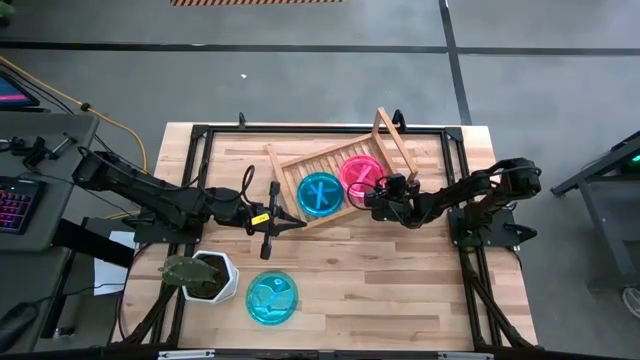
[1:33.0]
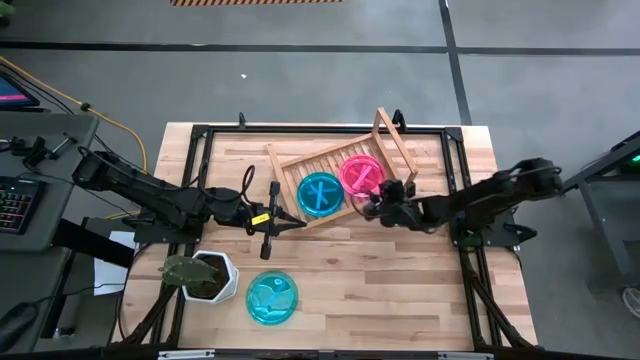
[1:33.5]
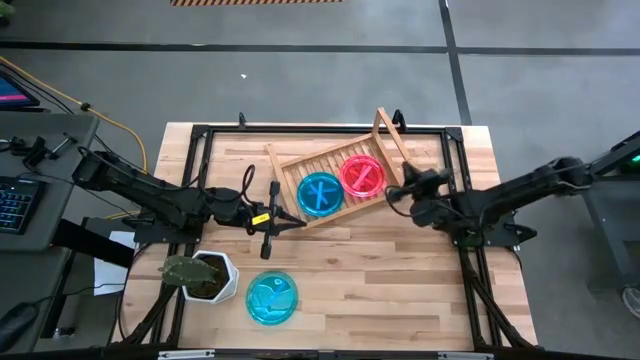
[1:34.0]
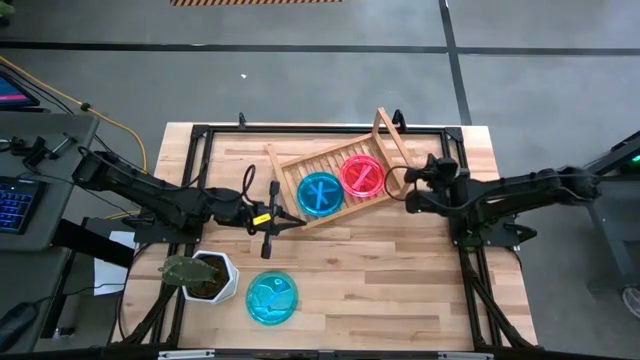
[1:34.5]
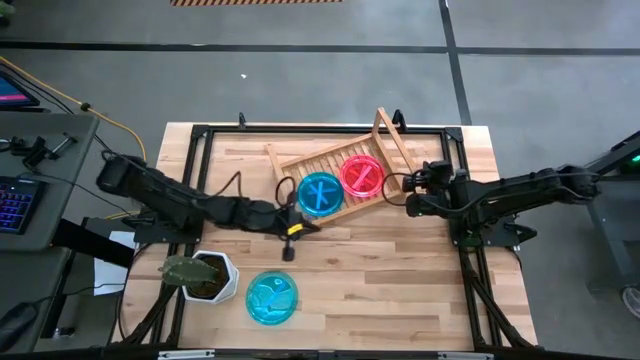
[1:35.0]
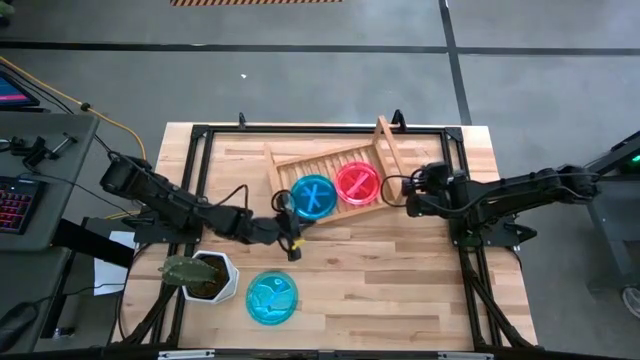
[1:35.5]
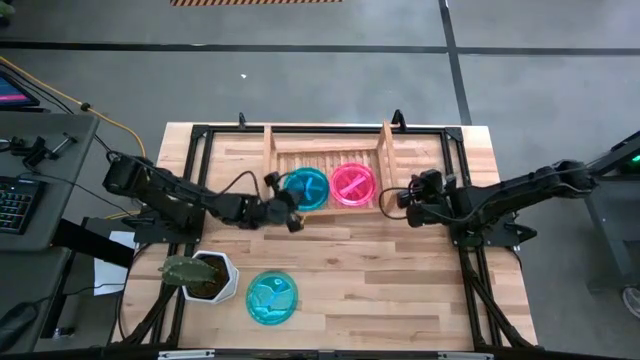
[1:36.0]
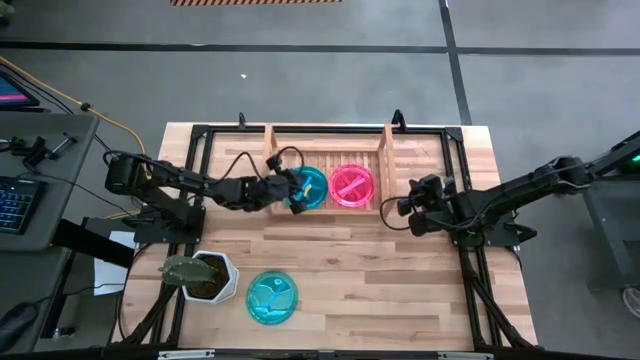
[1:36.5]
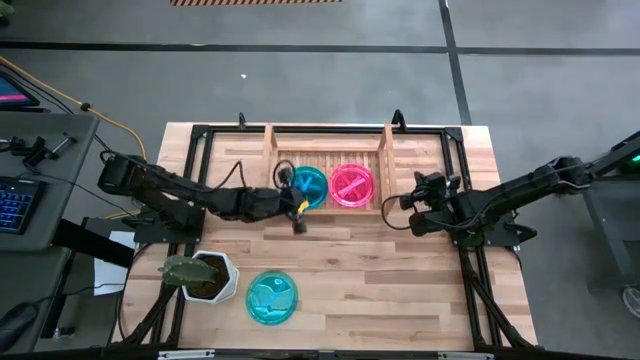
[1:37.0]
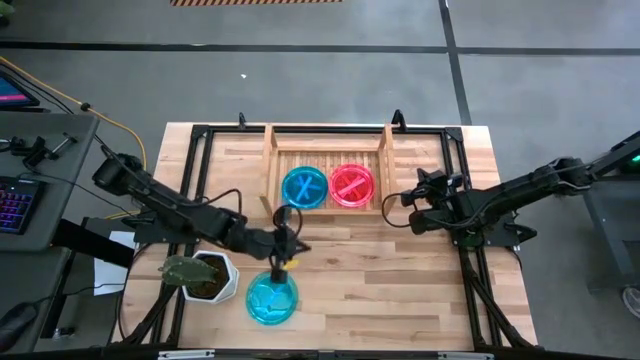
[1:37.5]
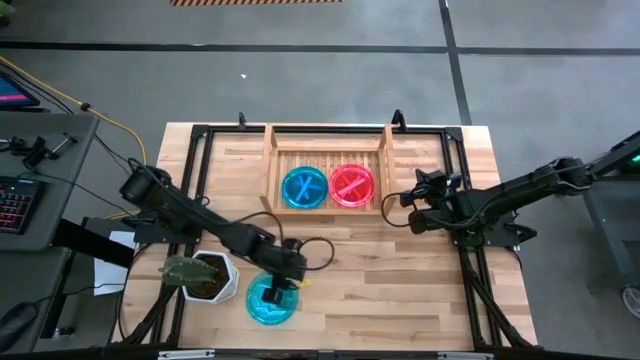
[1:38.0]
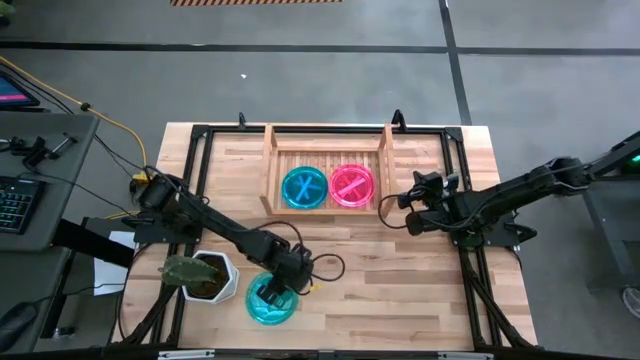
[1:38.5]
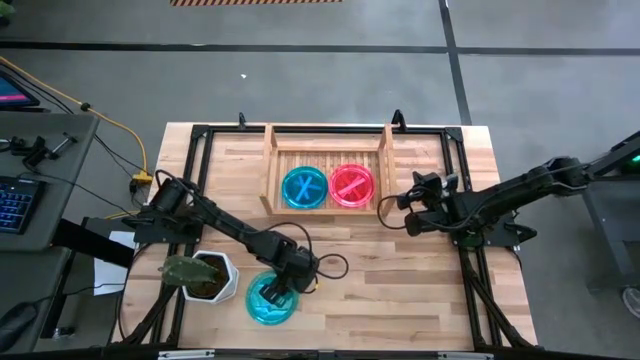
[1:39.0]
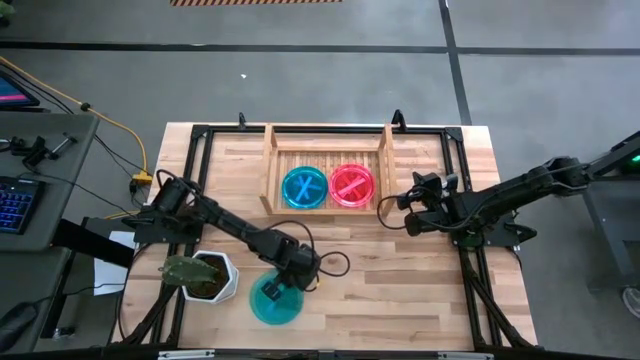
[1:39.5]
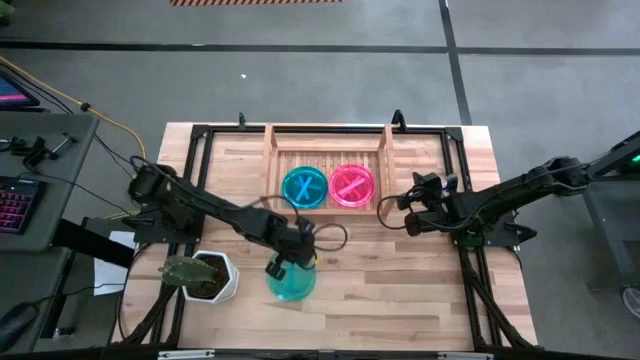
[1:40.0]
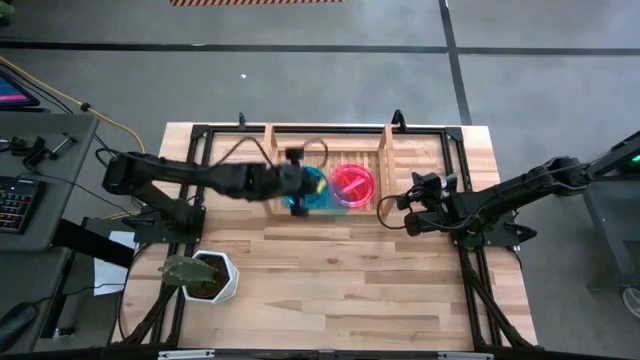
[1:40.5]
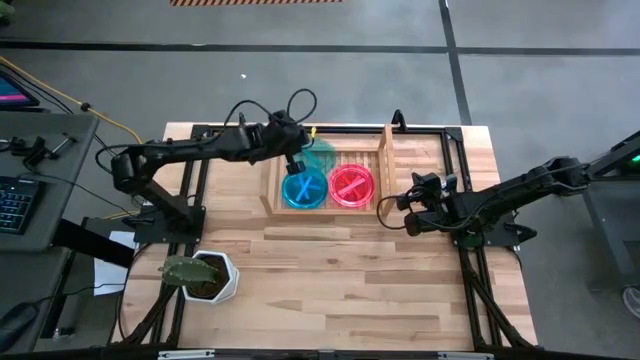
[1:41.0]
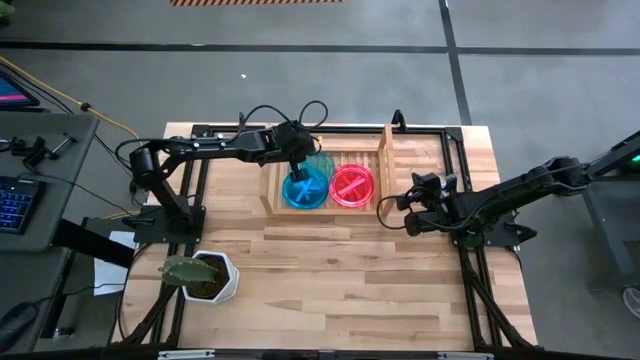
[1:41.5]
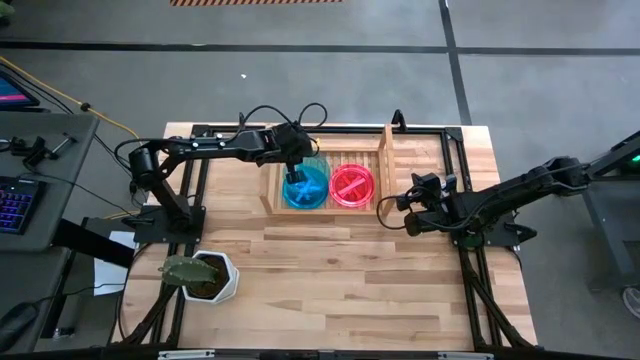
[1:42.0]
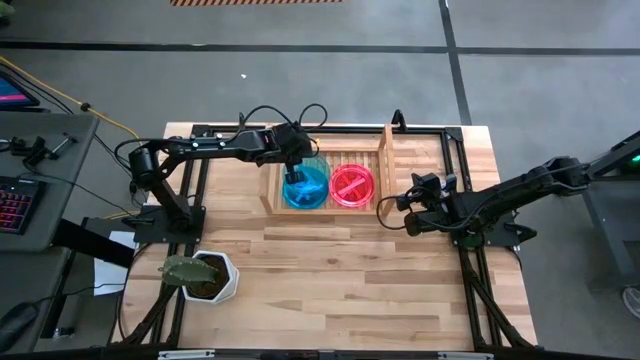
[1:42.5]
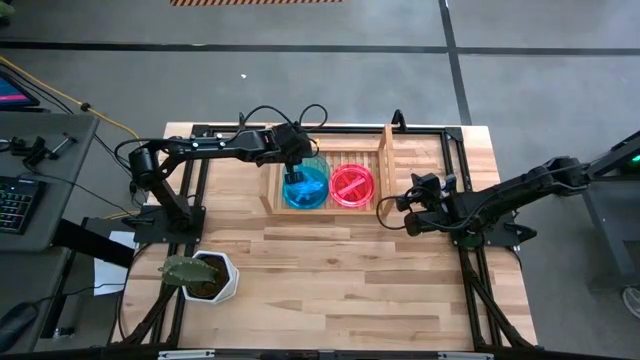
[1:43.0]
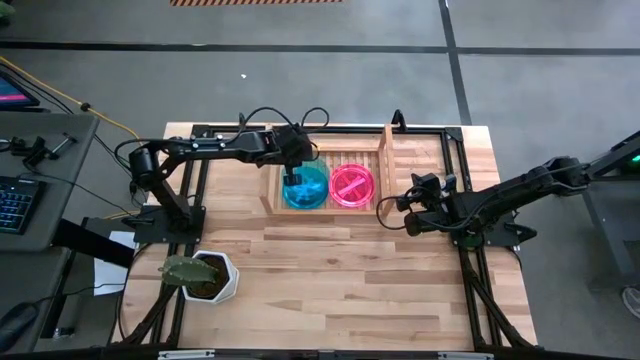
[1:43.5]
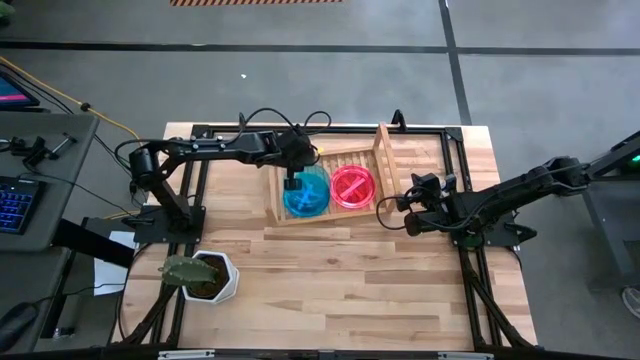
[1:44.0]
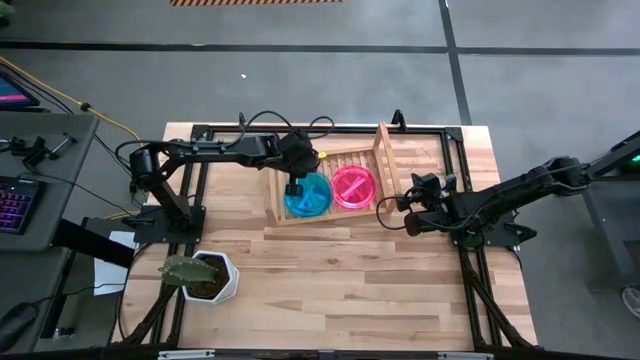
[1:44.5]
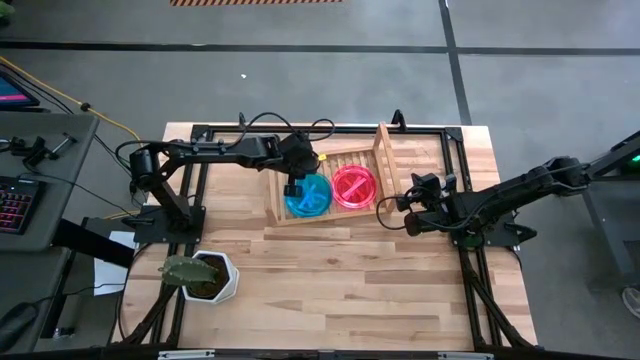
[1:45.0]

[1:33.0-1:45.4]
Task: Place and stack plates onto a shelf
Stack the blue plate on top of the blue plates on the shelf

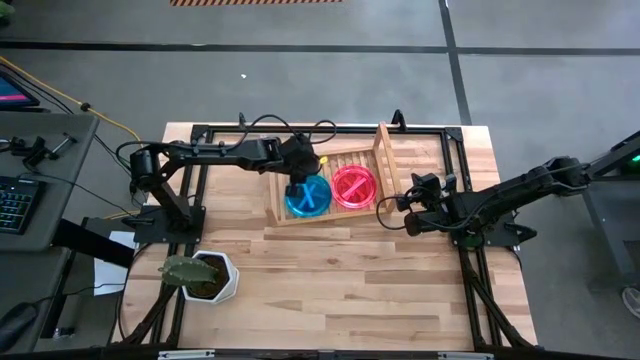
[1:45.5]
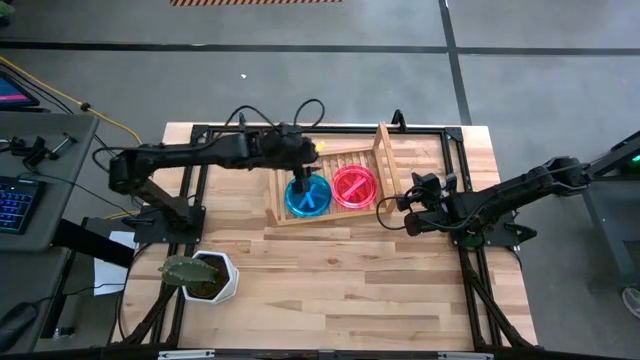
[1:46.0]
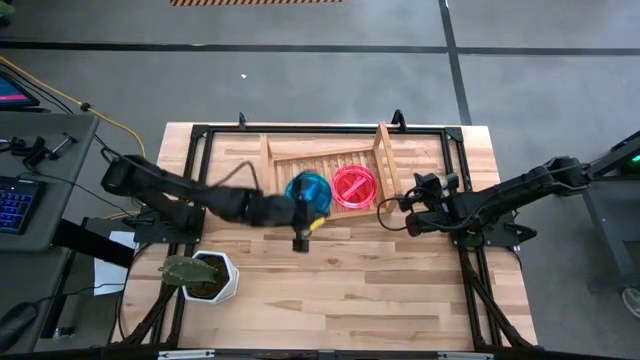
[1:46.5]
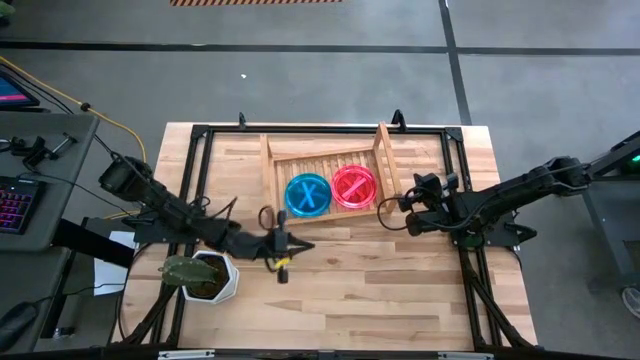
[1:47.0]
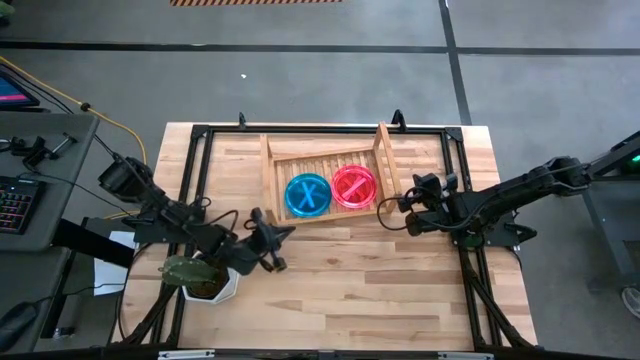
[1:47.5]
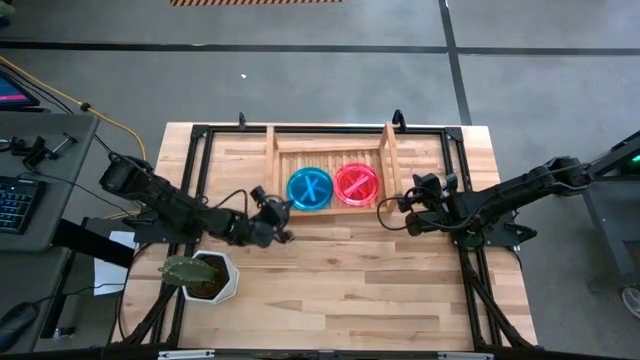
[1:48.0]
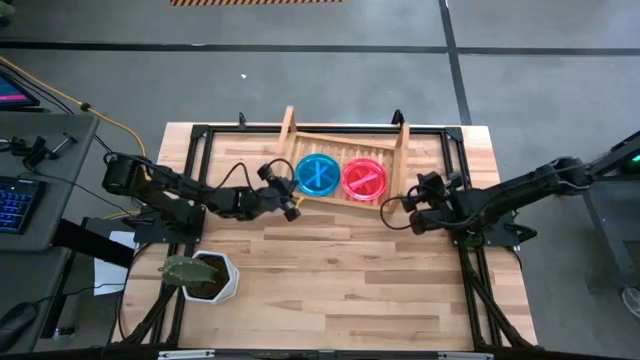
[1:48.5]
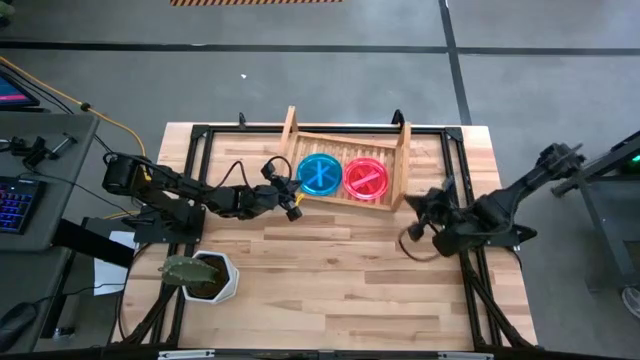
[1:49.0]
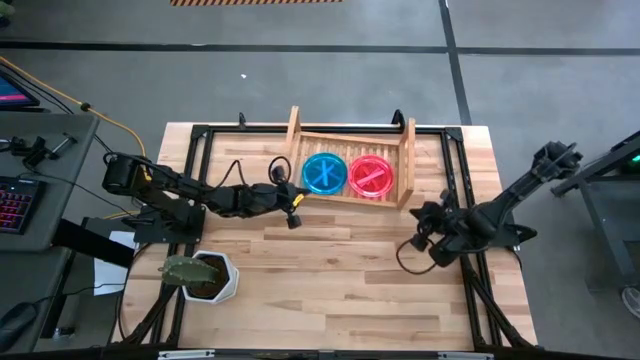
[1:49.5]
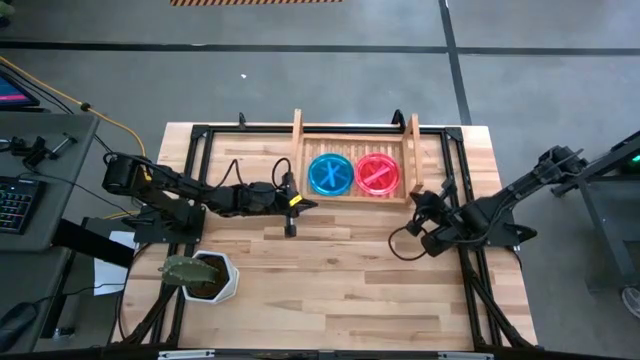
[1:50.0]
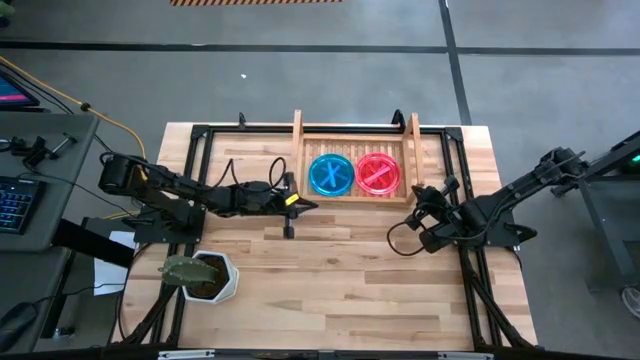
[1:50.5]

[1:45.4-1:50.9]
Adjust the shelf

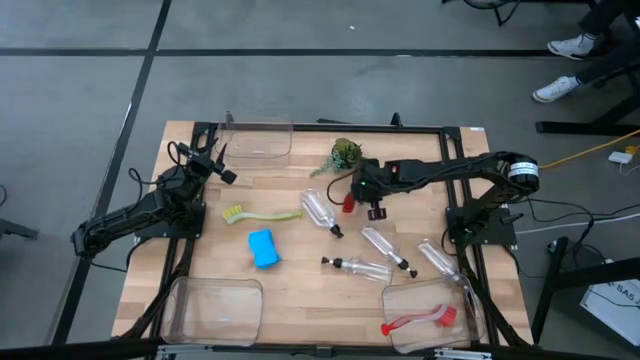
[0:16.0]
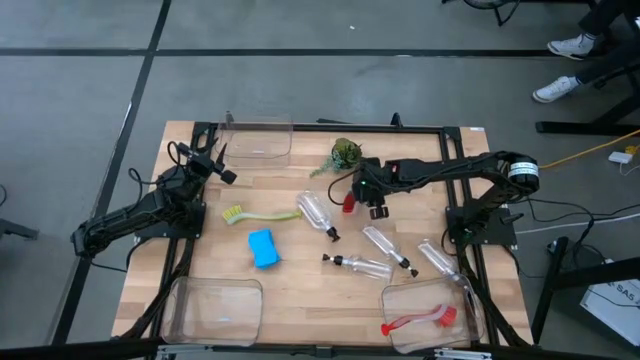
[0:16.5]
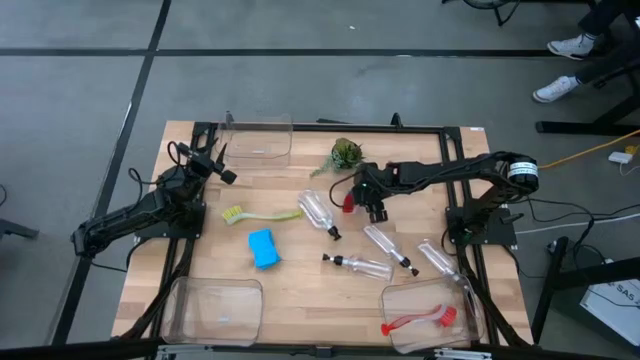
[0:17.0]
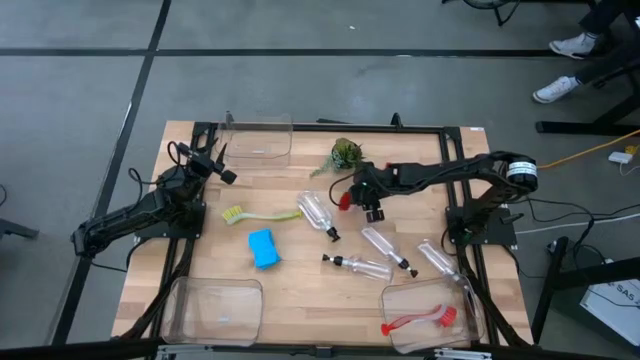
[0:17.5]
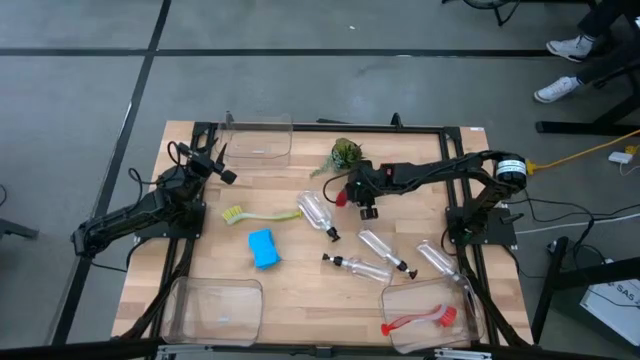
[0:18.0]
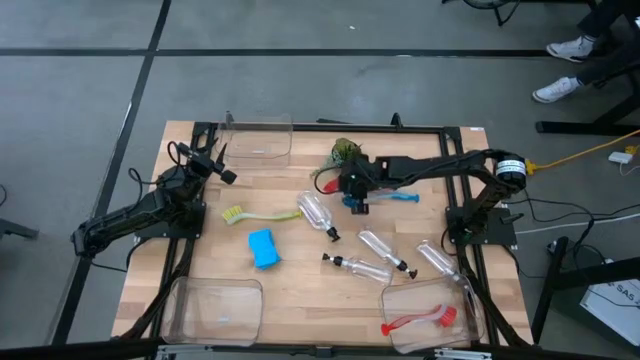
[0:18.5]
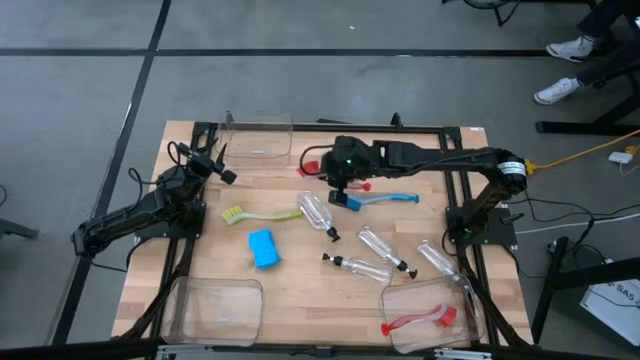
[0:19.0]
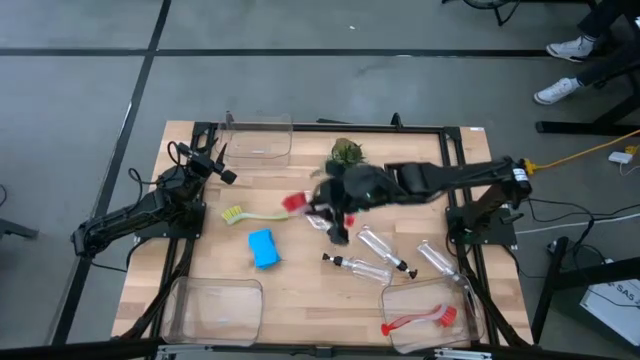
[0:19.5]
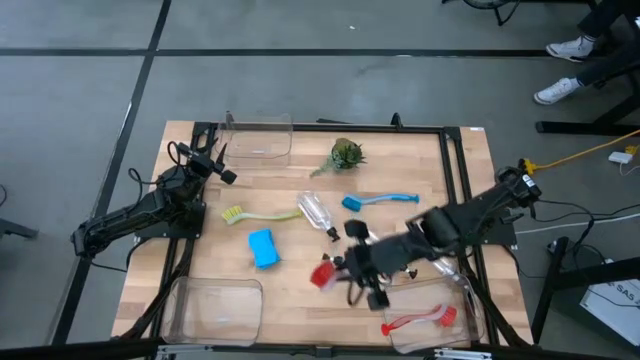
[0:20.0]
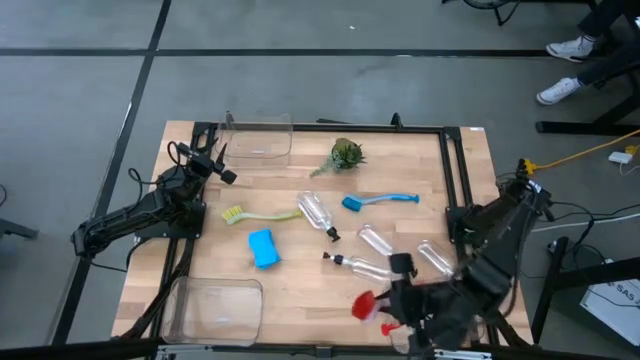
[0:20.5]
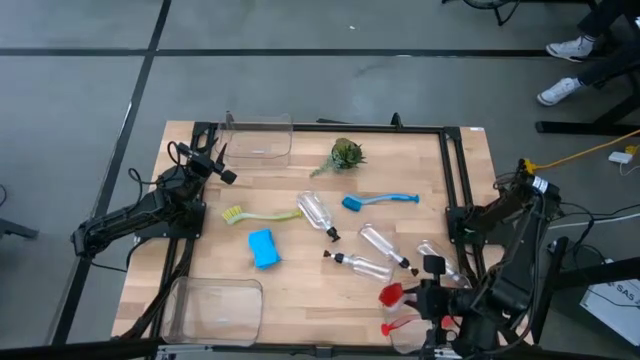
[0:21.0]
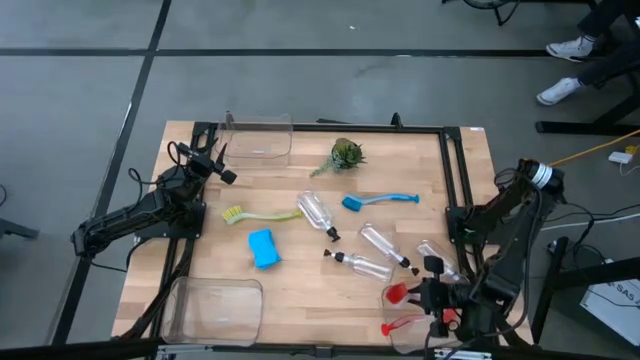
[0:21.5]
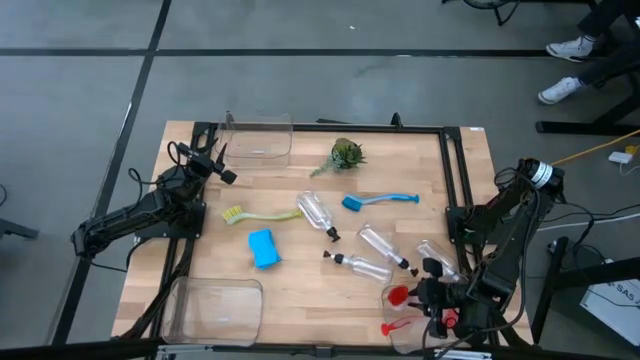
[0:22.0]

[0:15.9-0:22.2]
Task: Pick & Place Kitchen Sink Supplies
Put the red dish brush into the bottom right transparent bin
